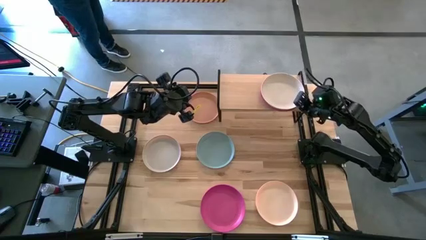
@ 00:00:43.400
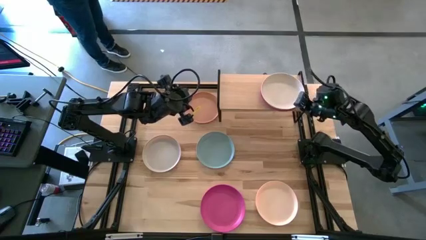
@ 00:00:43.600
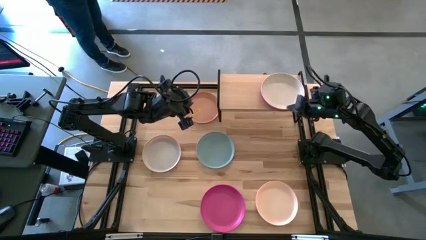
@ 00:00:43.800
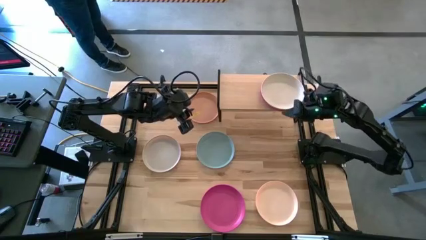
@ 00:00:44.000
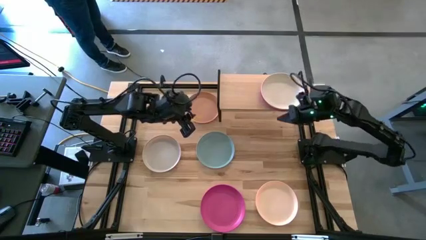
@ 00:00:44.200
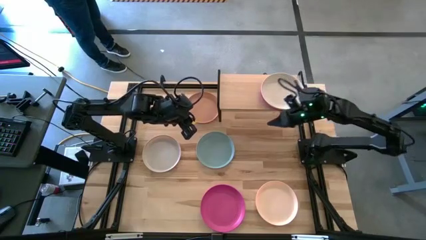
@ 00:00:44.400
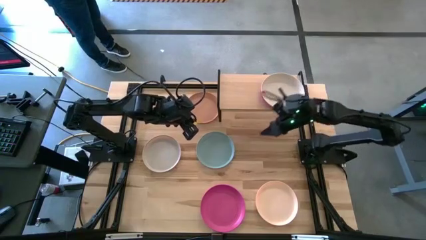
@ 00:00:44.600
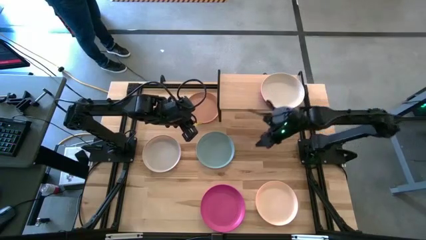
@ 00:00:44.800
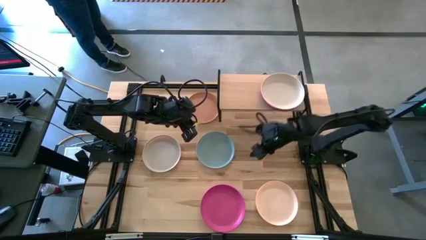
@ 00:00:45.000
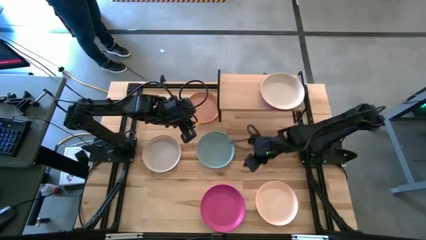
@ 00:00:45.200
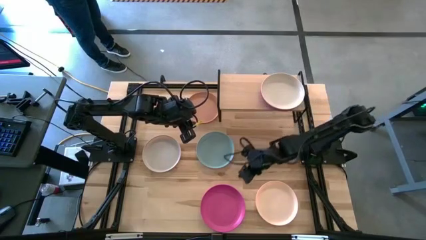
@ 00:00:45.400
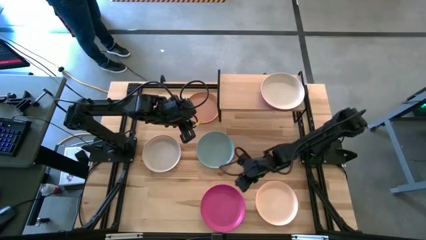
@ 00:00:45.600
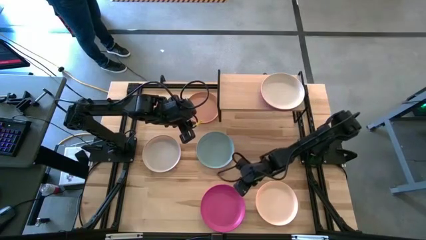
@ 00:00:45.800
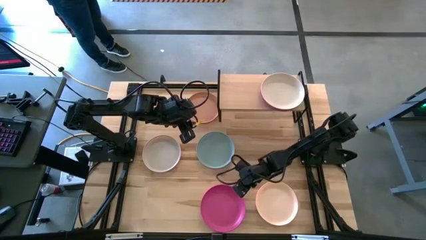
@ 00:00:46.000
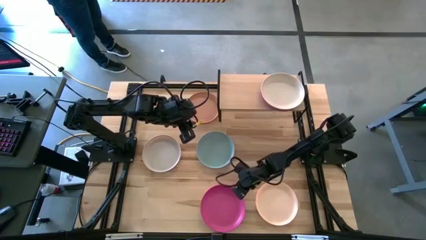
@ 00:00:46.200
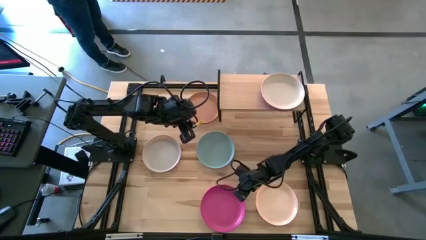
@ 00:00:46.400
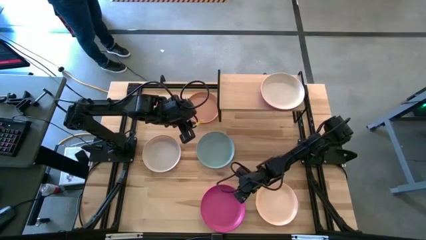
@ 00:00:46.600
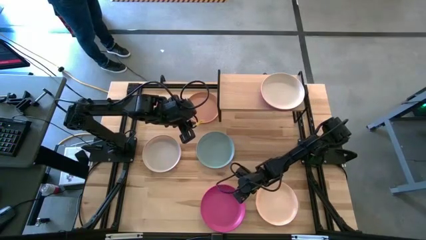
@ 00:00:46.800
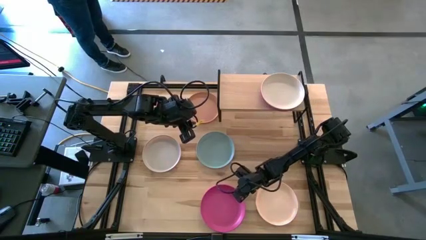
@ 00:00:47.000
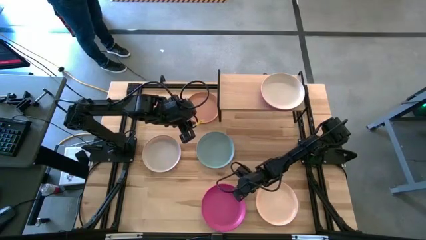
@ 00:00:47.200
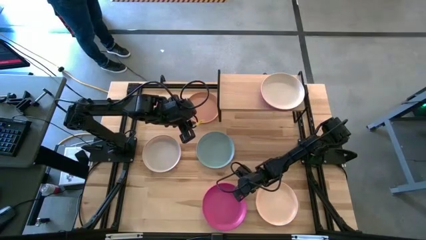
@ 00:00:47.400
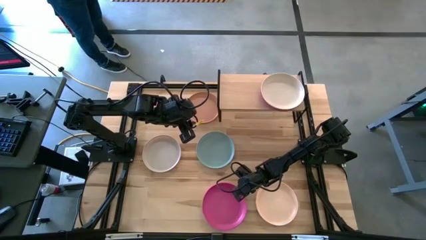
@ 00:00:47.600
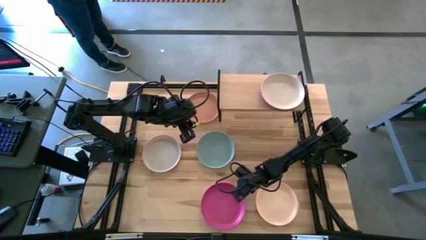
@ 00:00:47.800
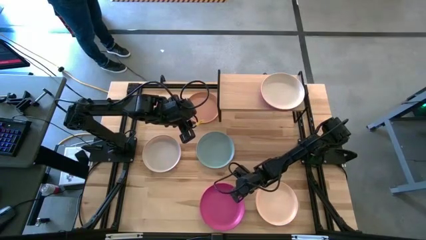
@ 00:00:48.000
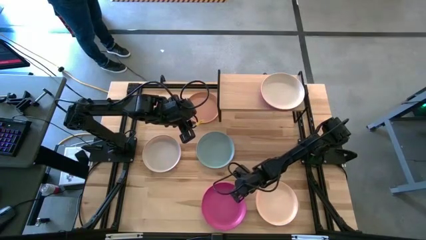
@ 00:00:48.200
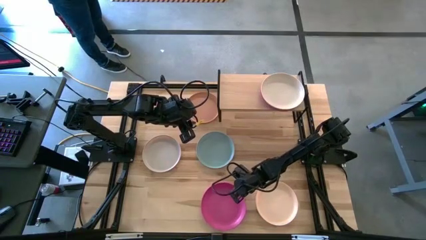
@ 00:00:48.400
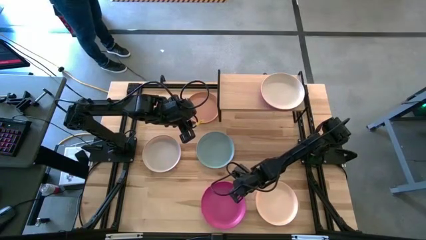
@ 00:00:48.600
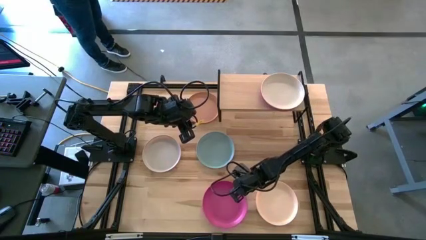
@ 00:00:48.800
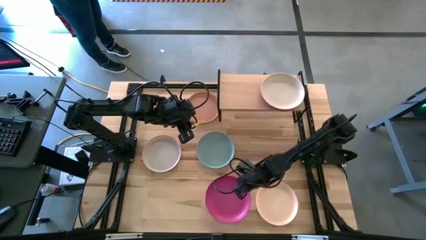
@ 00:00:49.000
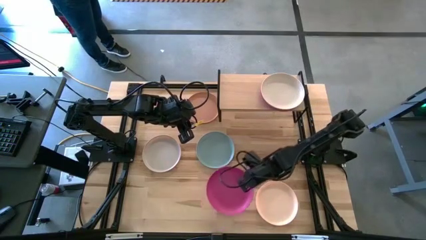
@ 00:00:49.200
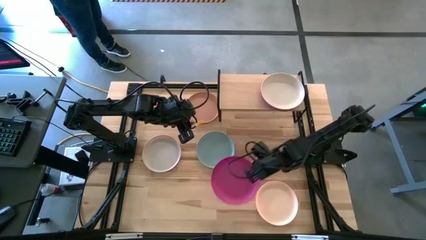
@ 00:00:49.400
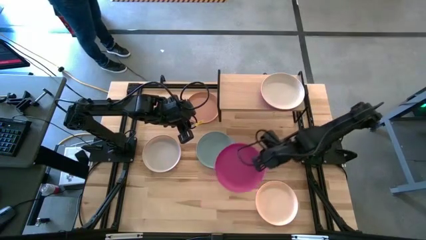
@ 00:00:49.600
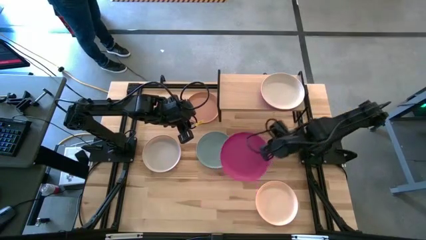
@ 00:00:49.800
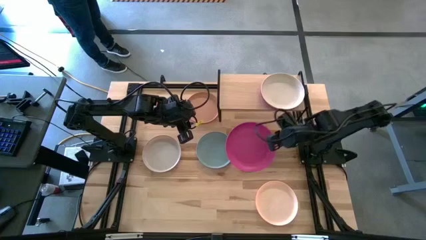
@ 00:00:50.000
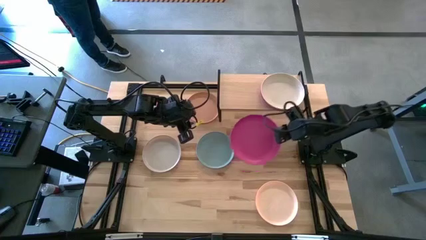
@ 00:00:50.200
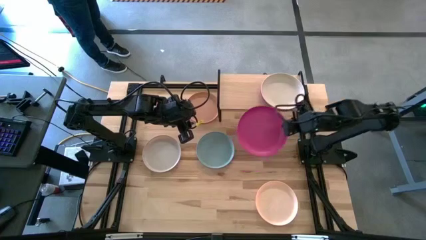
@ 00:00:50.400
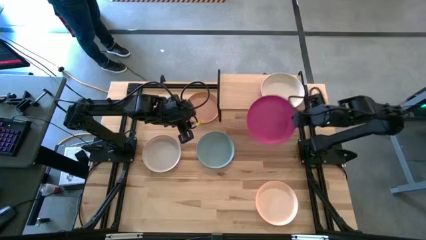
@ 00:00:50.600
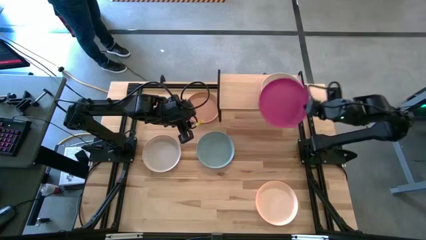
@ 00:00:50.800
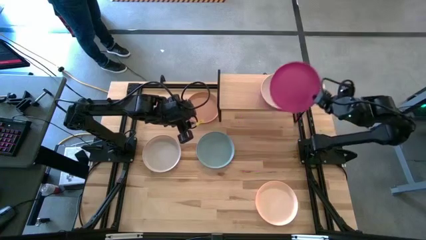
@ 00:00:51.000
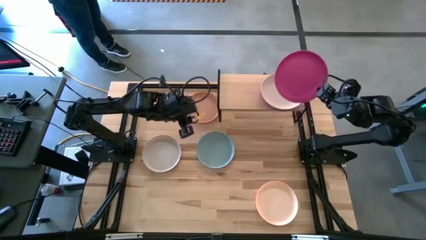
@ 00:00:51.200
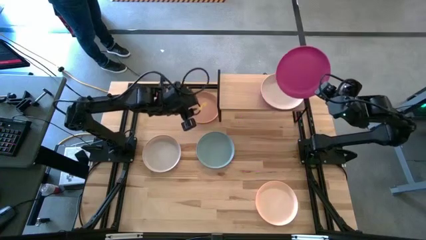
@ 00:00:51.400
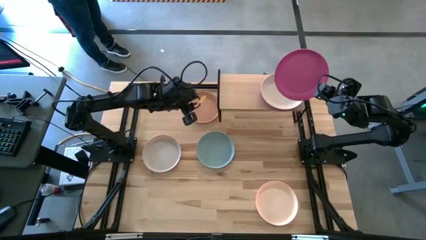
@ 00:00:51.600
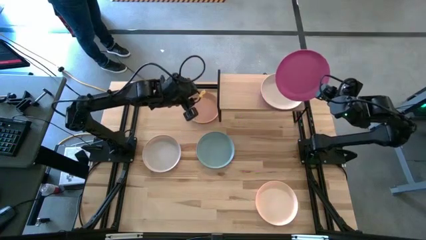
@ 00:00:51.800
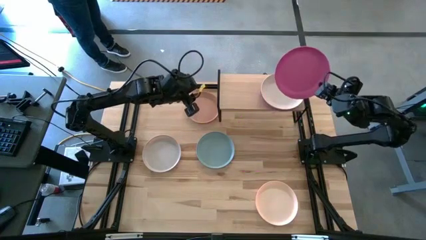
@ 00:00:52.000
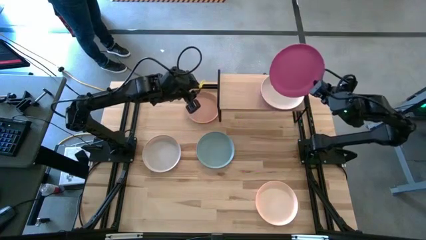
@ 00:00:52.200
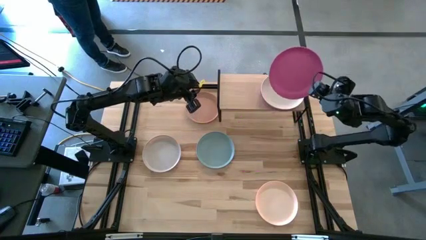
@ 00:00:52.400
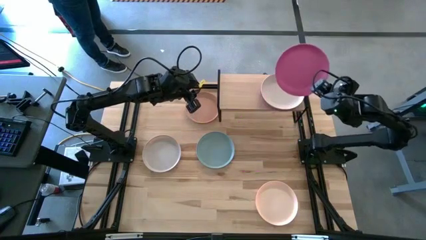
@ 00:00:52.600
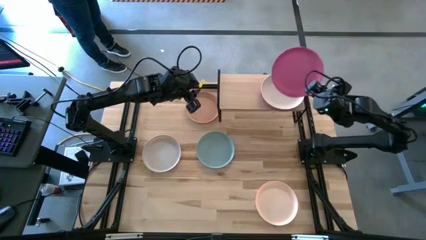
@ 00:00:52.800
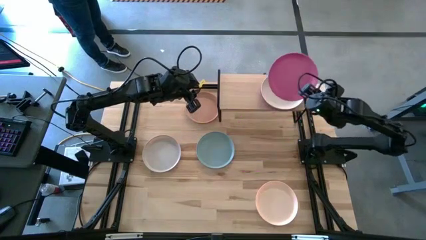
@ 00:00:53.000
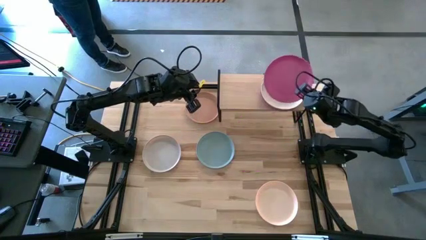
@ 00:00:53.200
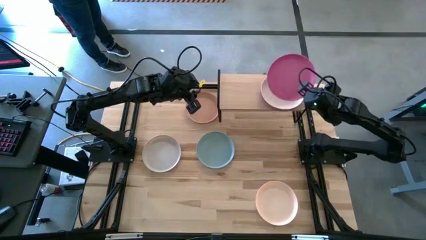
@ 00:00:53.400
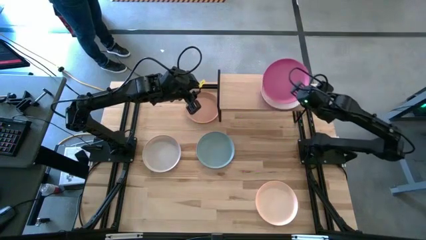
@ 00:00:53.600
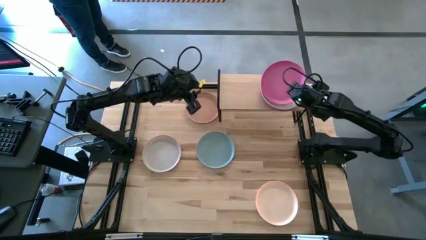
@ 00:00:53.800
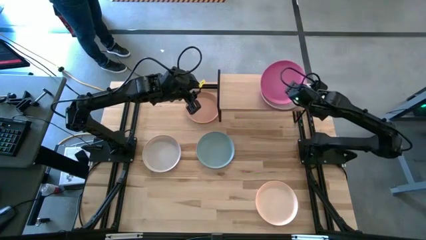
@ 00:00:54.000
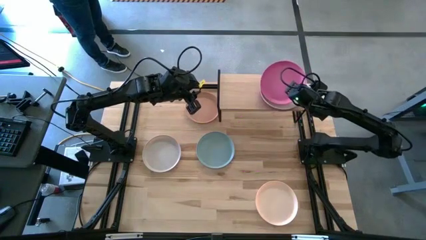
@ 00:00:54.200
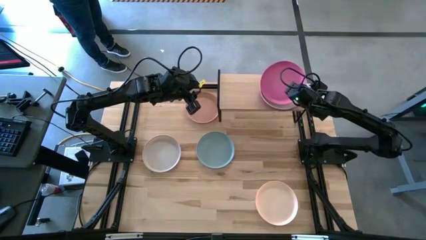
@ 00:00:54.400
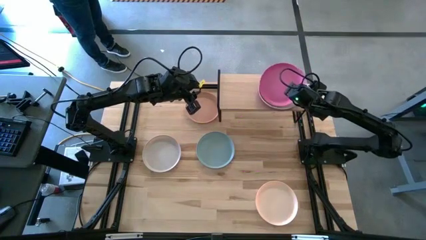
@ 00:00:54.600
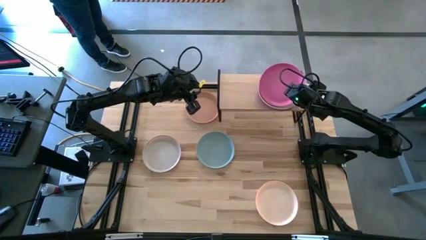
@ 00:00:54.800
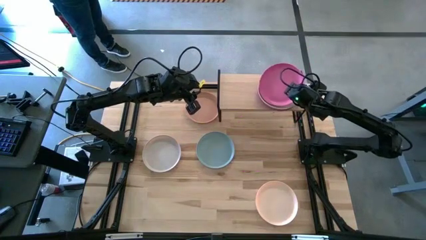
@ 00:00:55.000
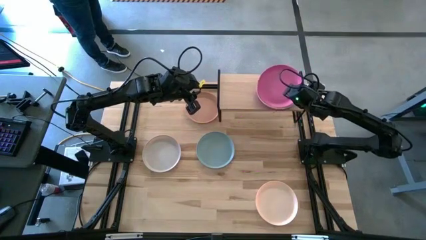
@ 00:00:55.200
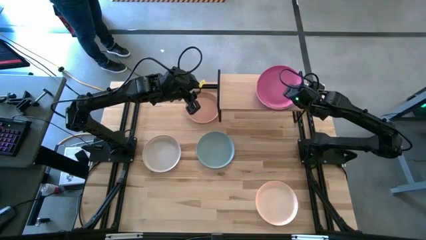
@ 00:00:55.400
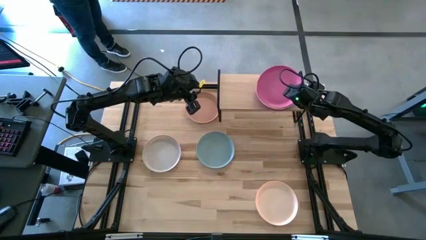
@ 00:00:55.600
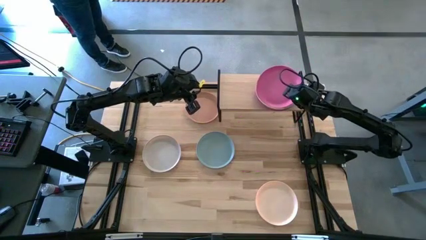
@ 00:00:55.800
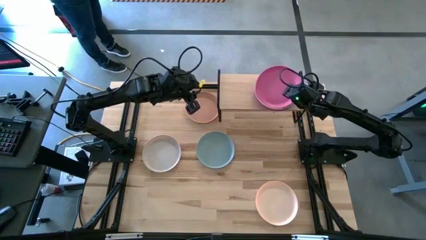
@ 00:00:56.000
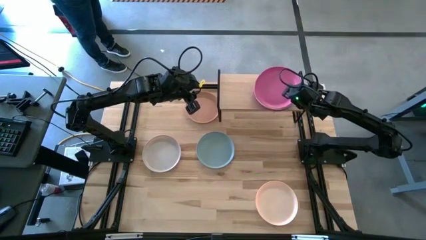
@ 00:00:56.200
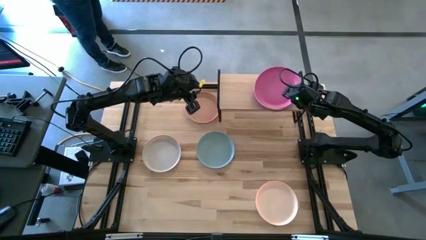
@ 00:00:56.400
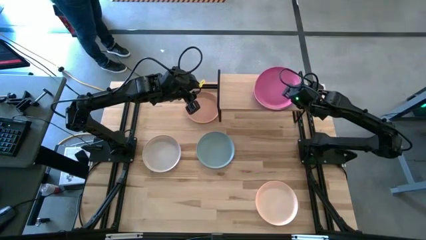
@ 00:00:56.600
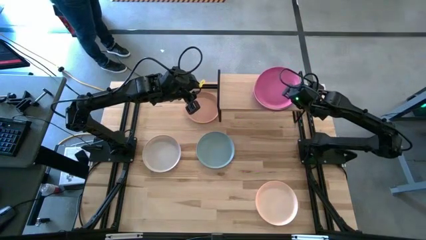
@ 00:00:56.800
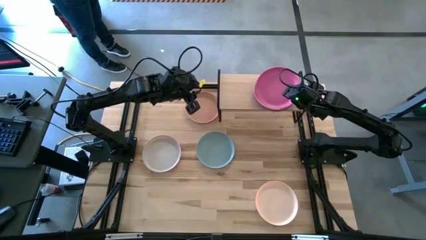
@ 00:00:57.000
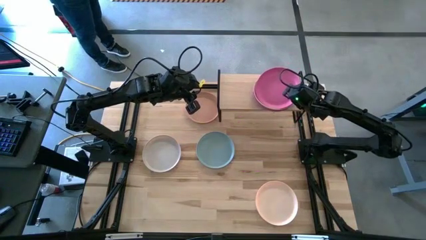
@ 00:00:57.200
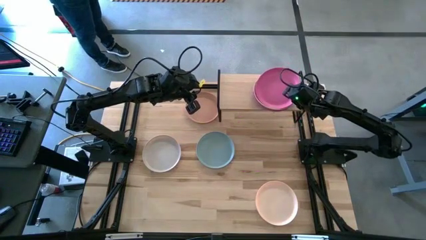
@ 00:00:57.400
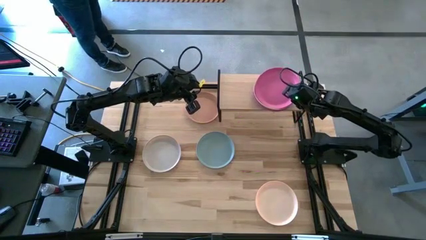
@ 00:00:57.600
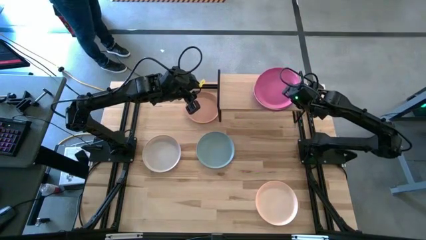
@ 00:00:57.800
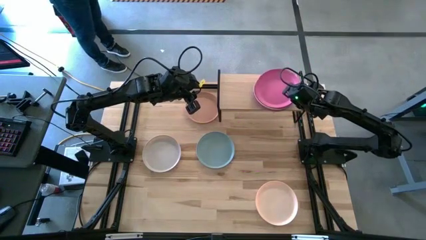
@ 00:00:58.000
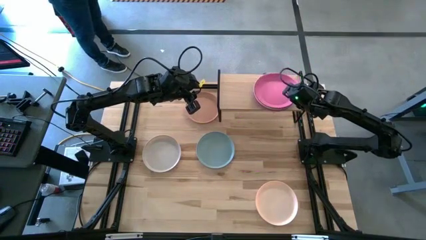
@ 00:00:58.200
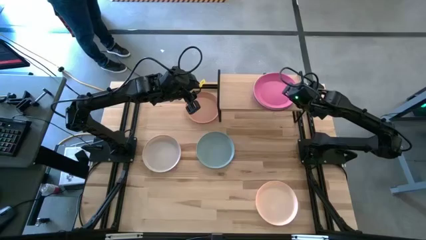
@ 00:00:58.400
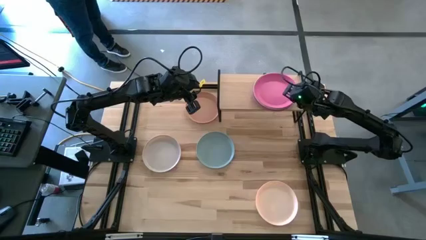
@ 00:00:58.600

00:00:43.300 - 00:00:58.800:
Task: Place and stack plates onto a shelf
Stack the pink plate on the white plate on the shelf

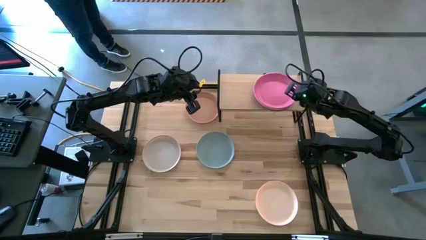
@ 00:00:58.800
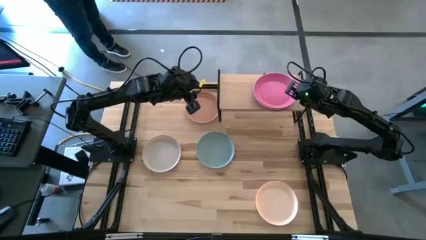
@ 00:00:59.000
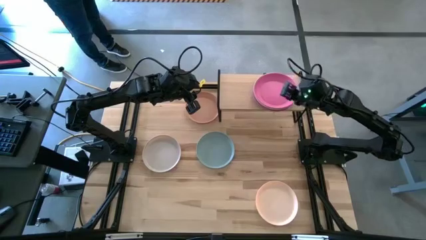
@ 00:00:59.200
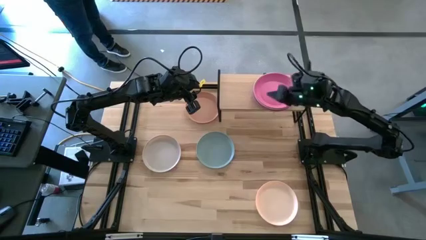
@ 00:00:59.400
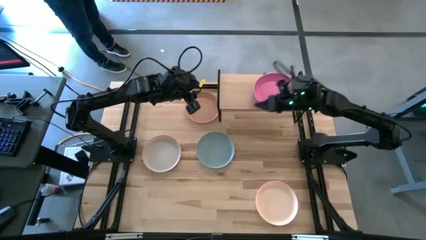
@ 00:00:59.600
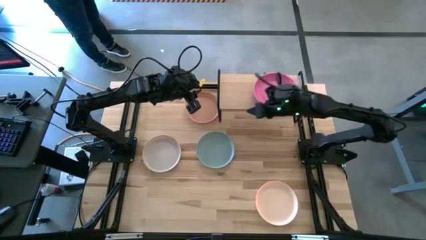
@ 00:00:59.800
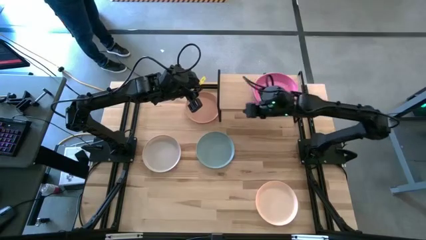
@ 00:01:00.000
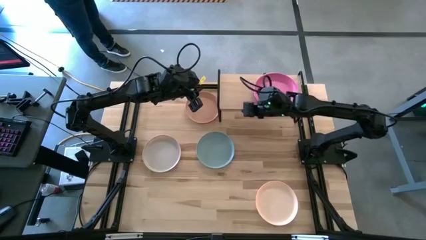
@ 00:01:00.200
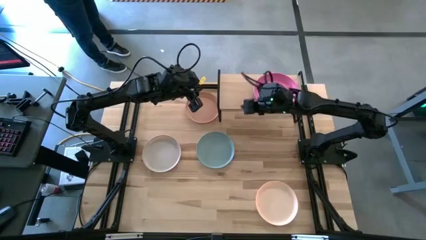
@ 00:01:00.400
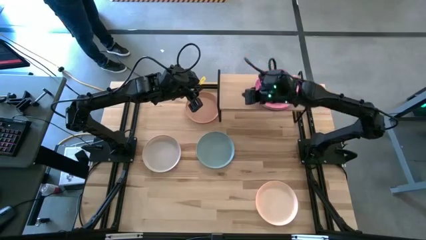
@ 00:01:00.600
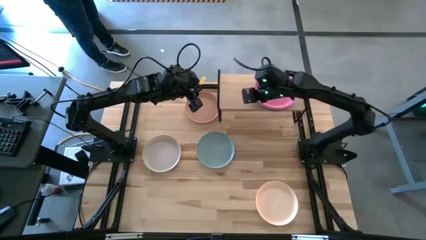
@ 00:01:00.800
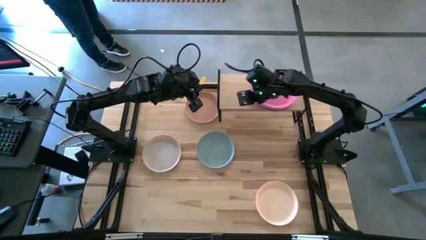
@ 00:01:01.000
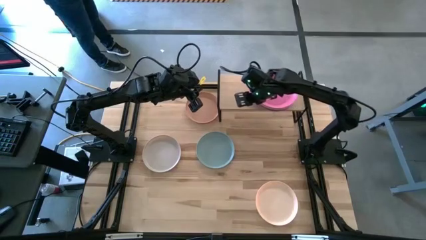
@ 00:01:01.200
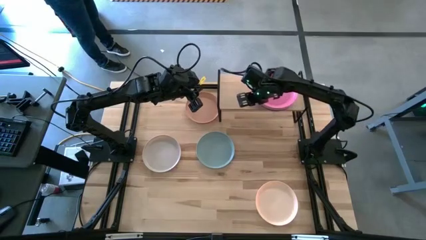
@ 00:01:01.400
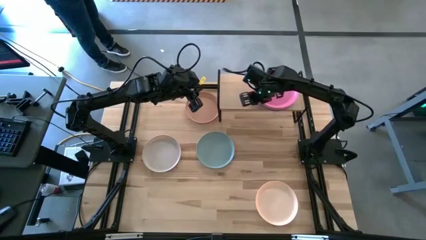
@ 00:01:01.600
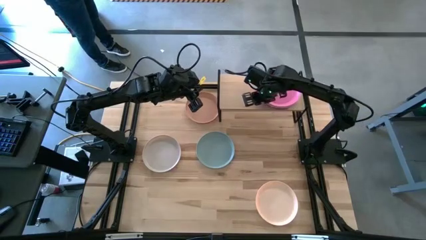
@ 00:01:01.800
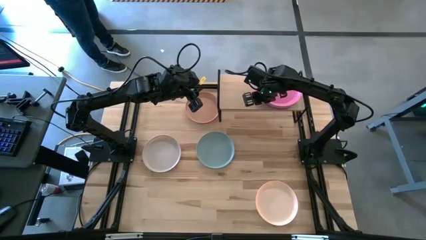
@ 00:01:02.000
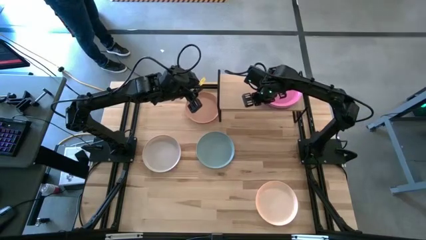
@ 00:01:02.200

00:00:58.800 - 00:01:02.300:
Adjust the stacked plates on the shelf
